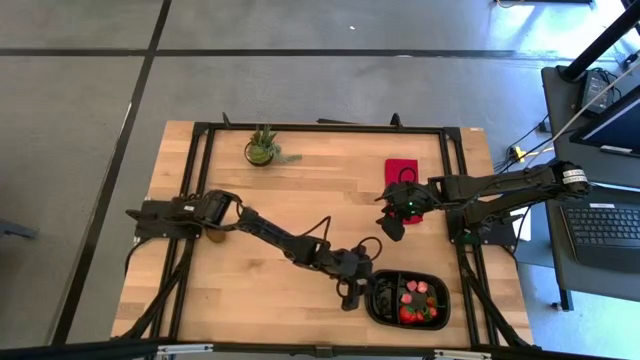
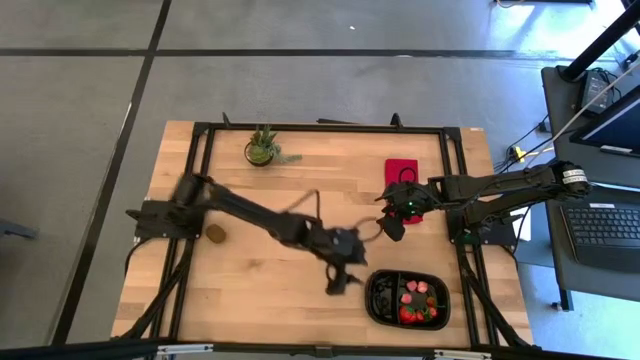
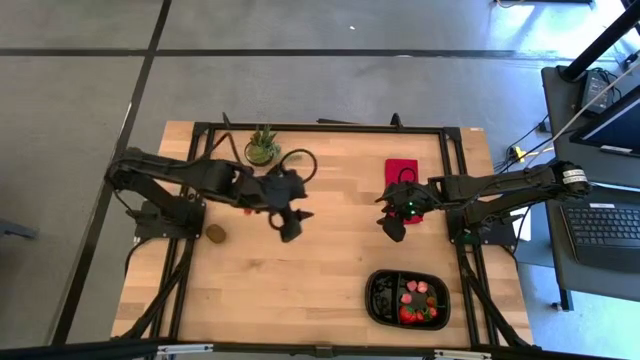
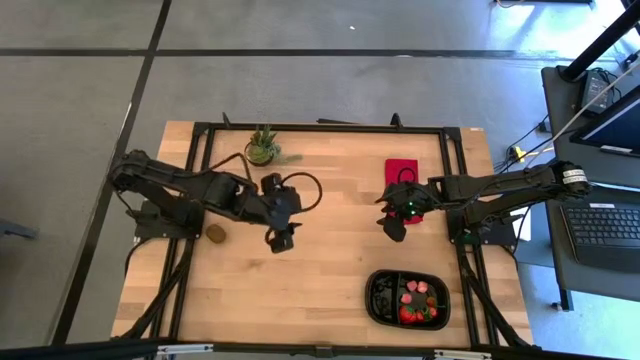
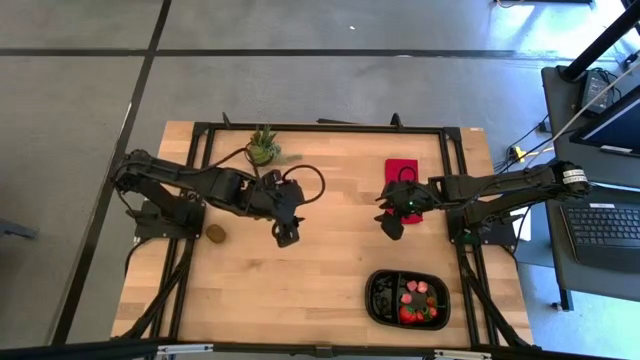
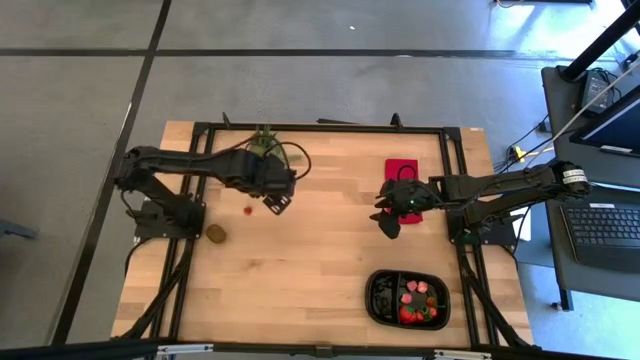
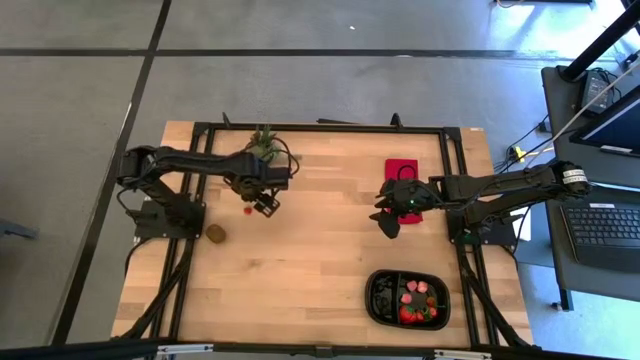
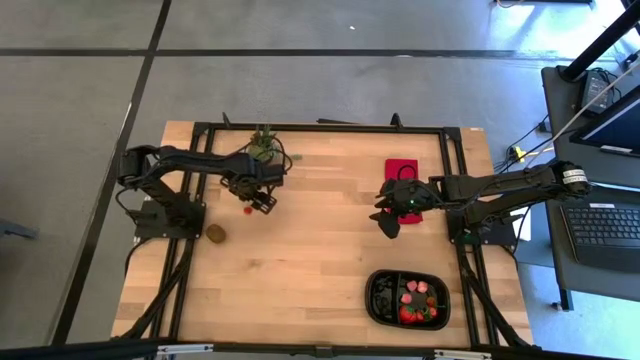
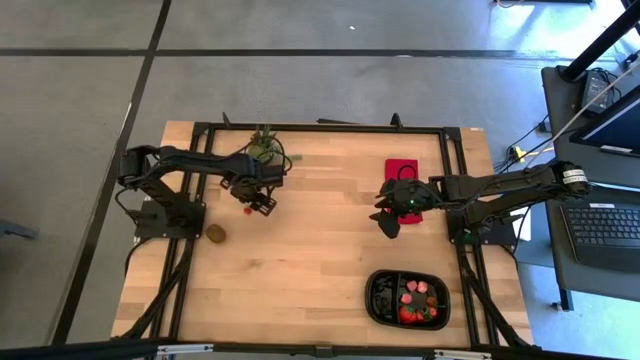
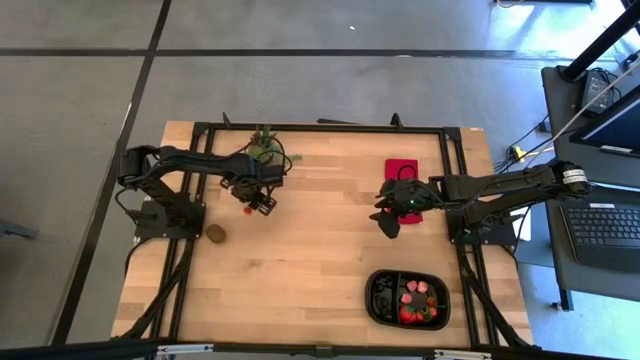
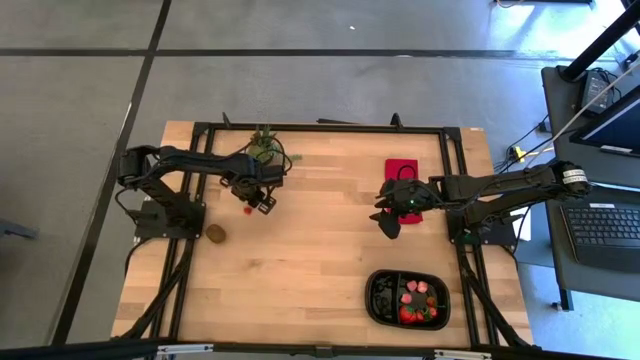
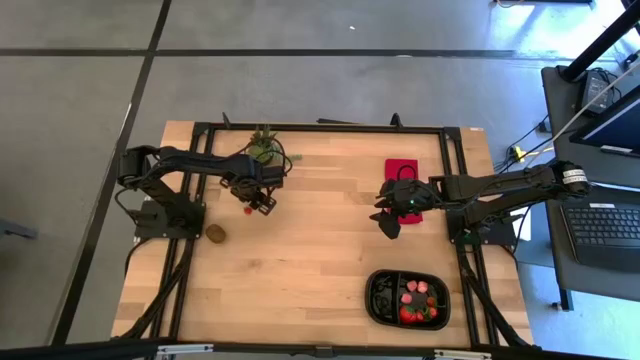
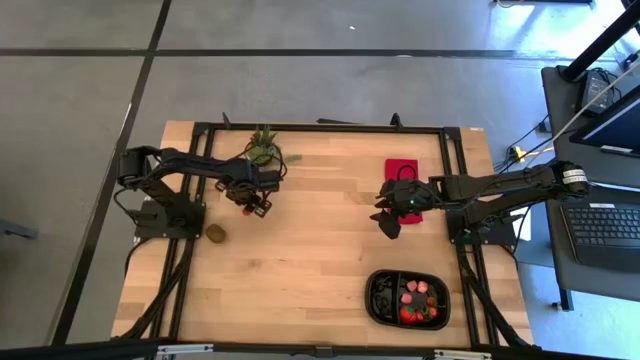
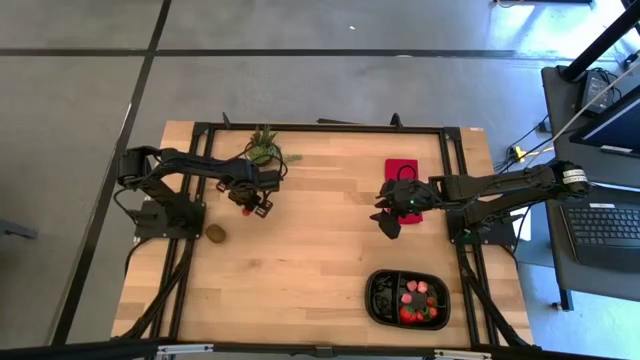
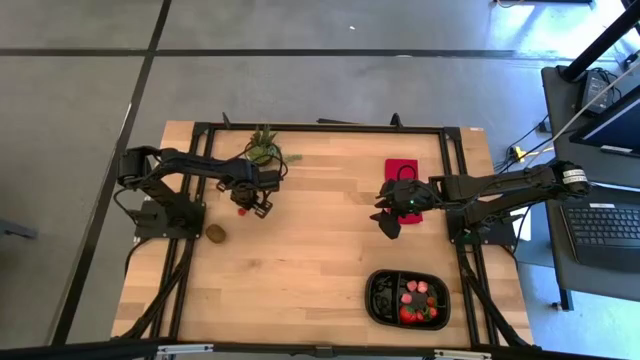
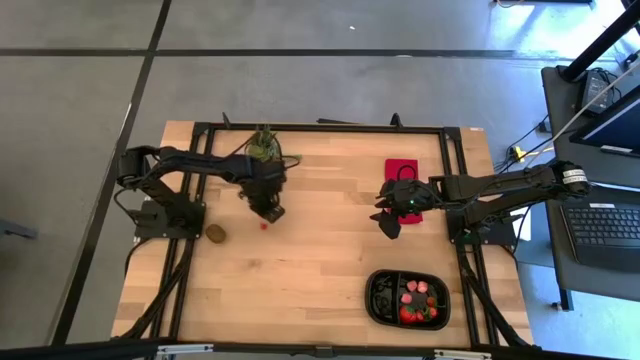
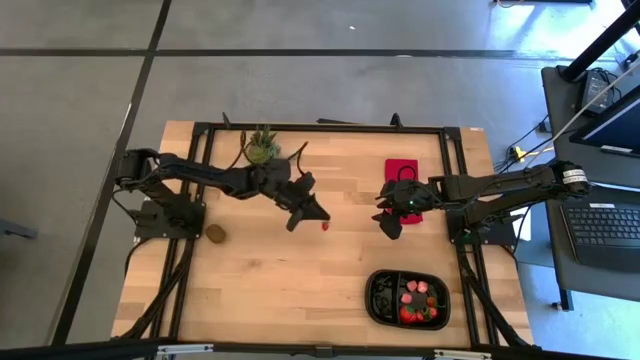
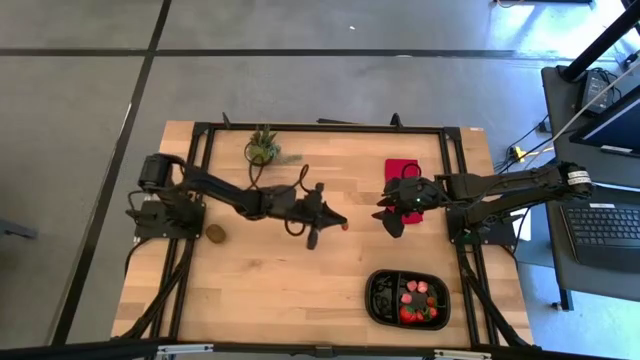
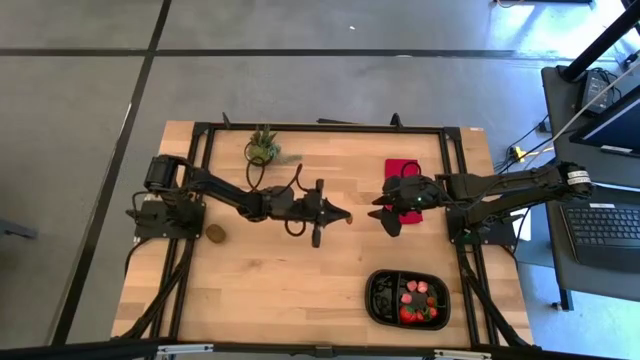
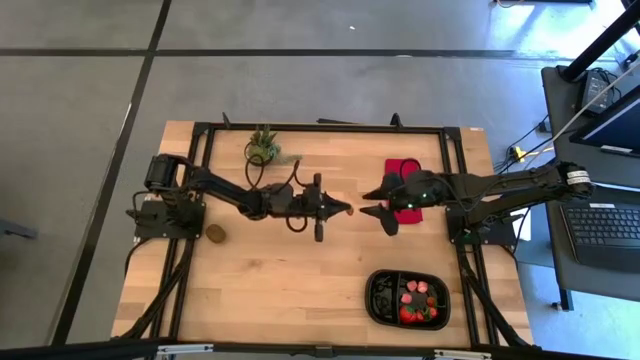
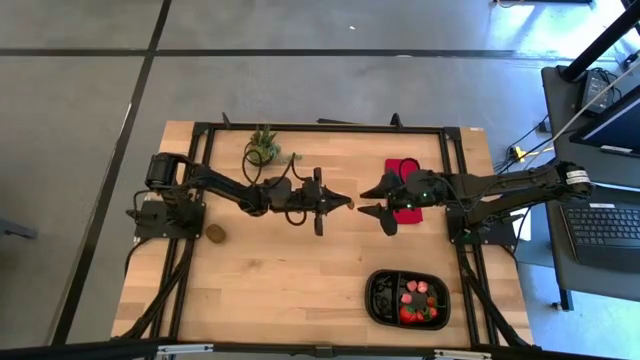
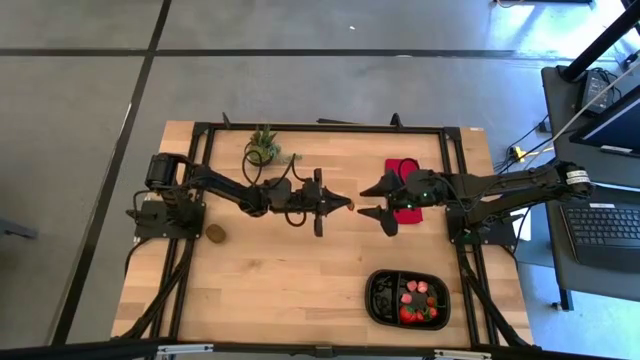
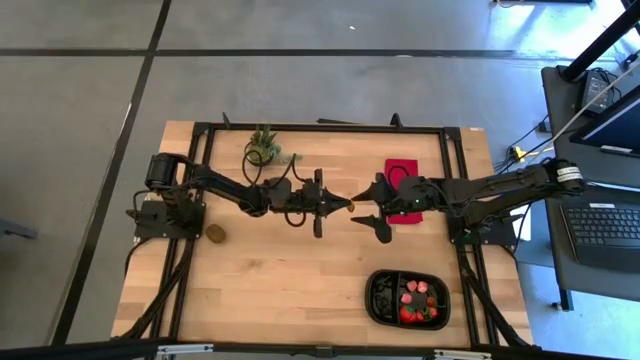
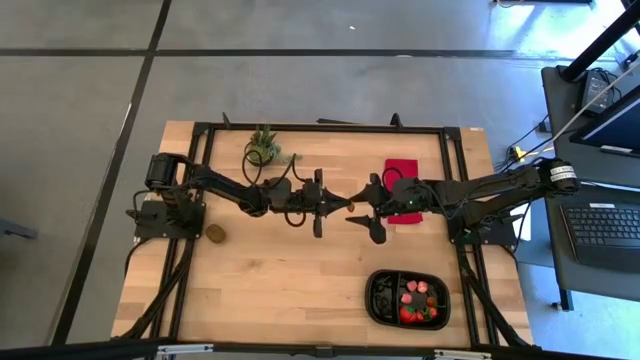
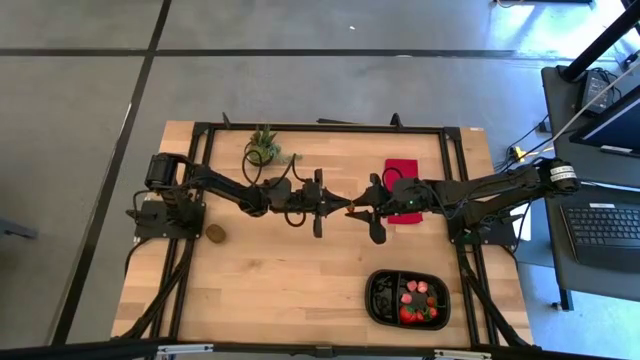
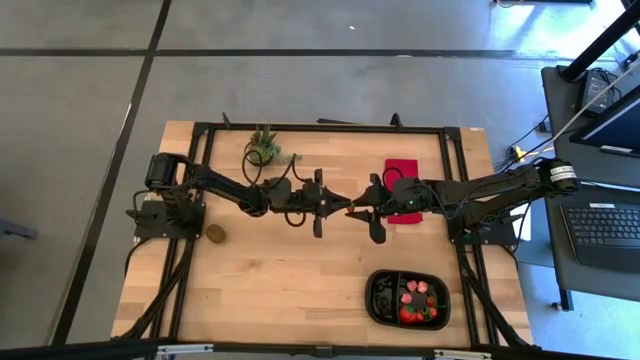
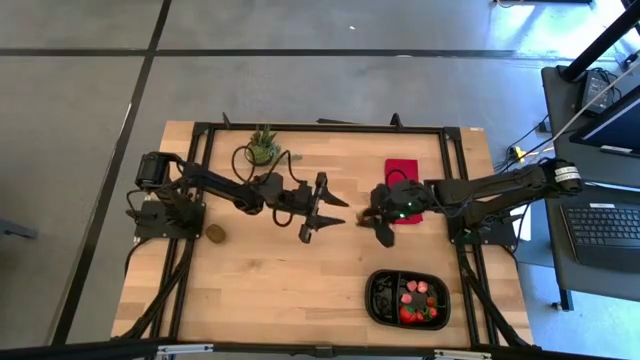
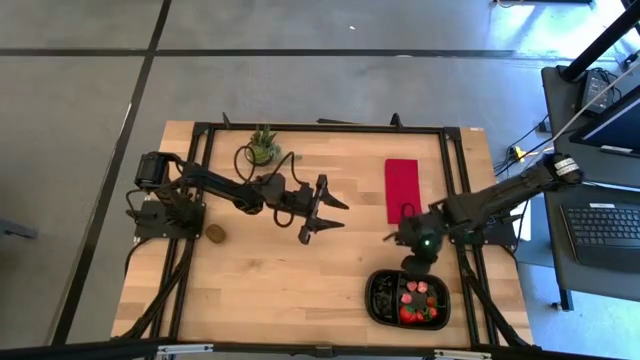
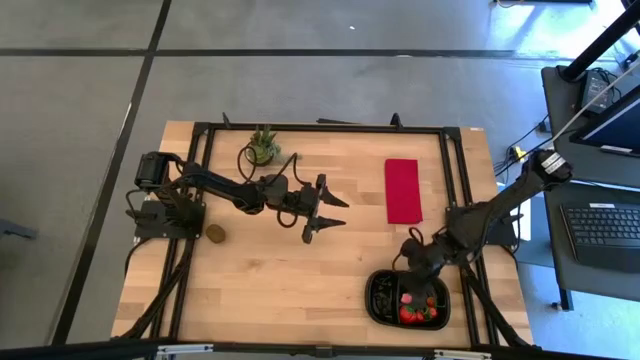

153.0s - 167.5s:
Task: Pick and placing Produce into tupperware
Put the strawberry into the right of the black bin

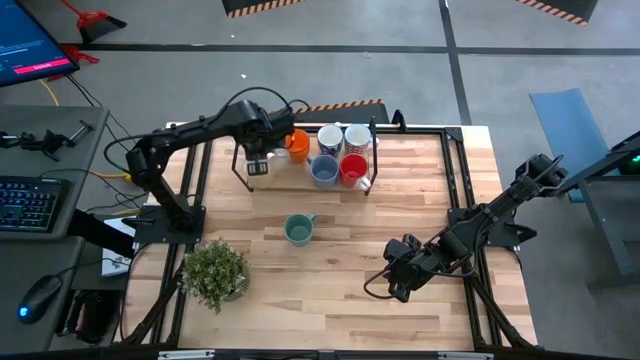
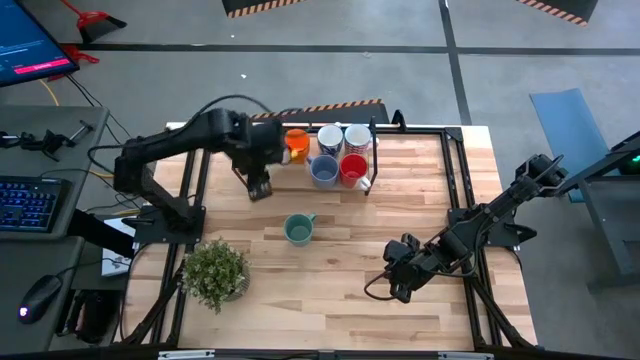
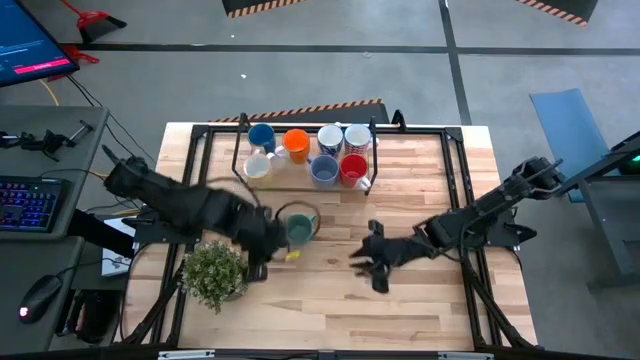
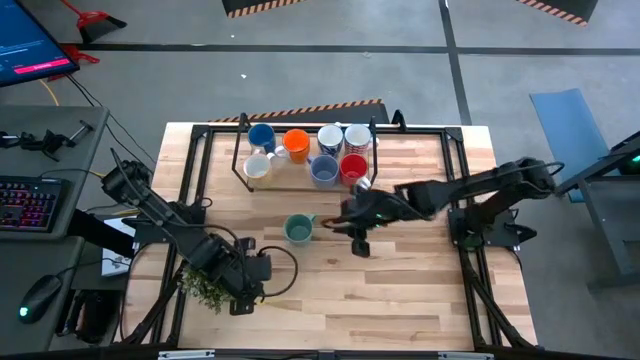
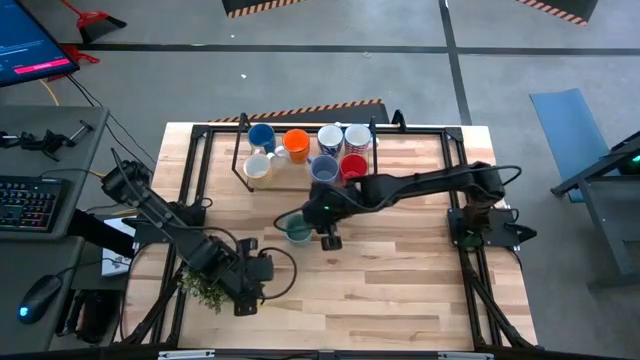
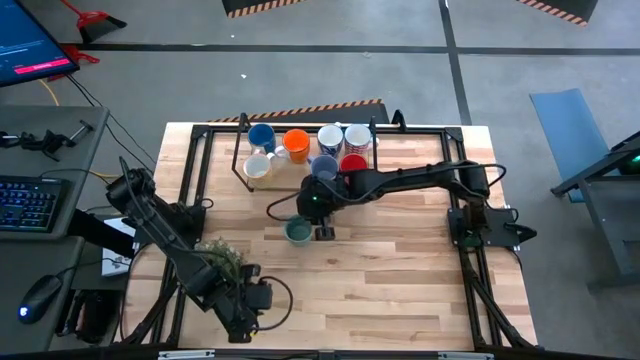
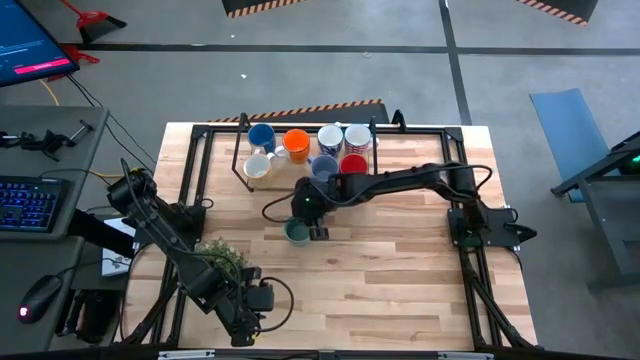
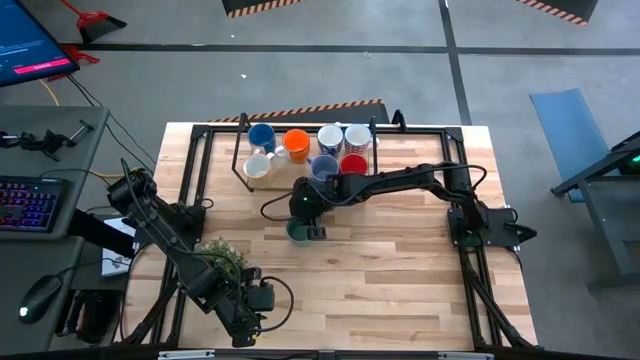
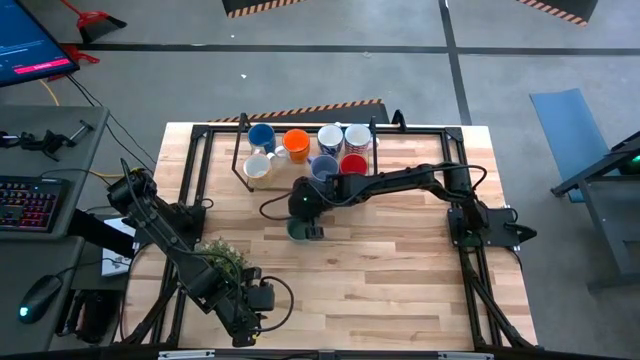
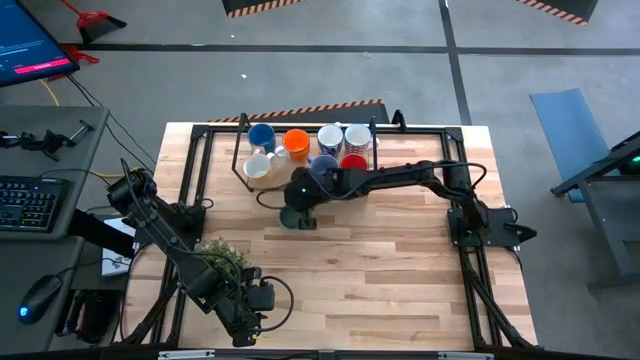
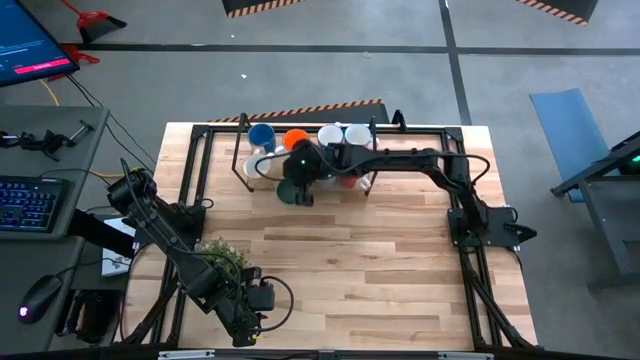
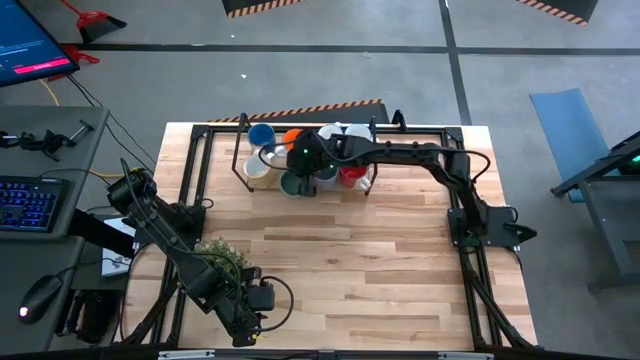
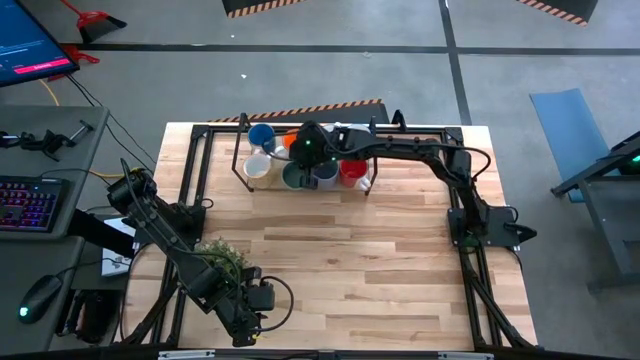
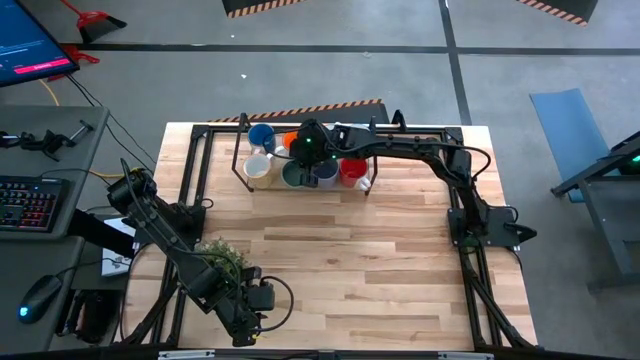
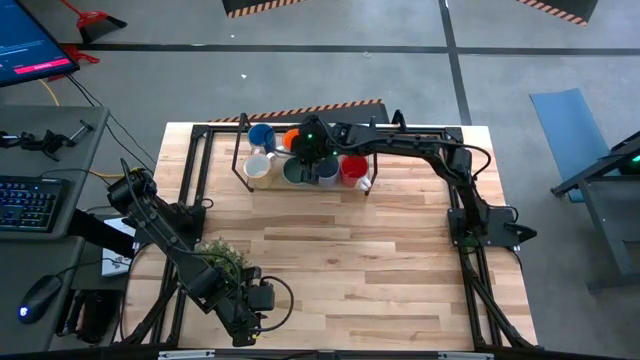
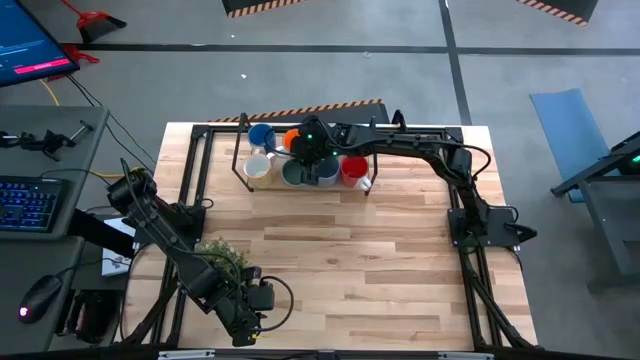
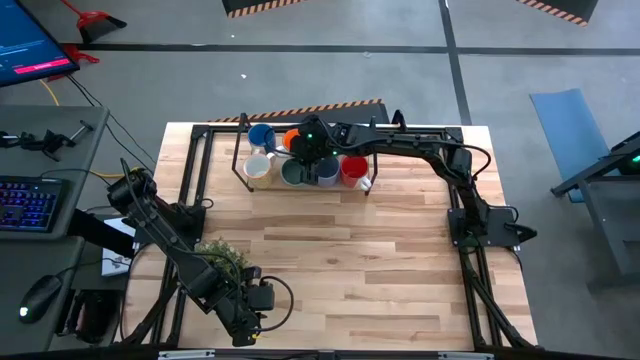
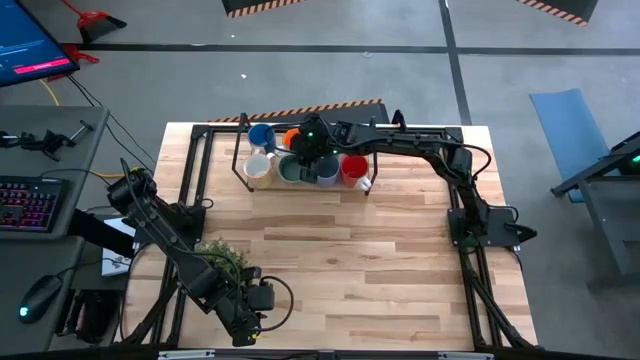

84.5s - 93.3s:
Task: Place coffee mugs
Put the green mug on the shelf
